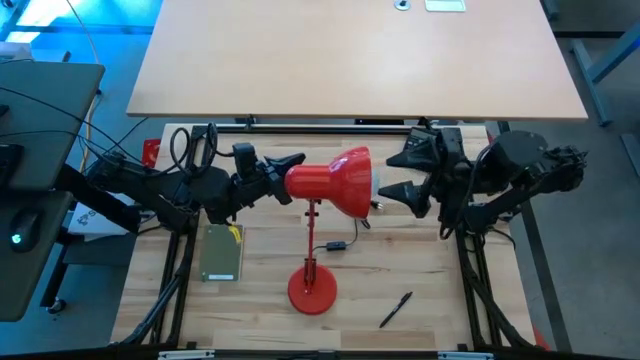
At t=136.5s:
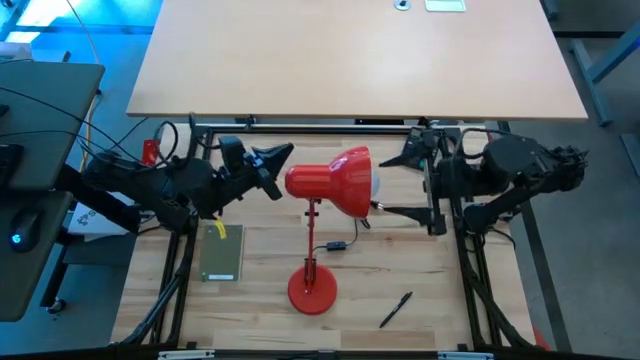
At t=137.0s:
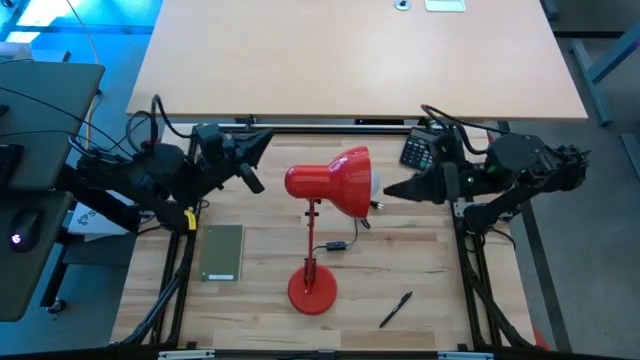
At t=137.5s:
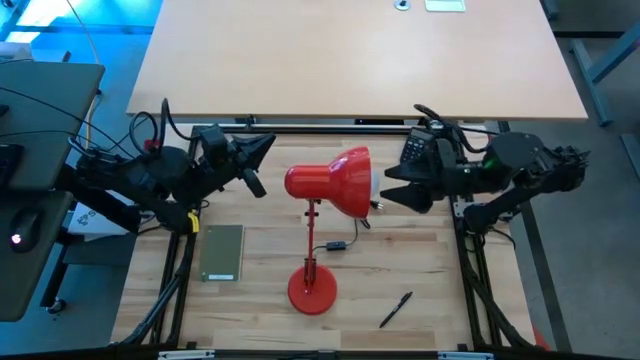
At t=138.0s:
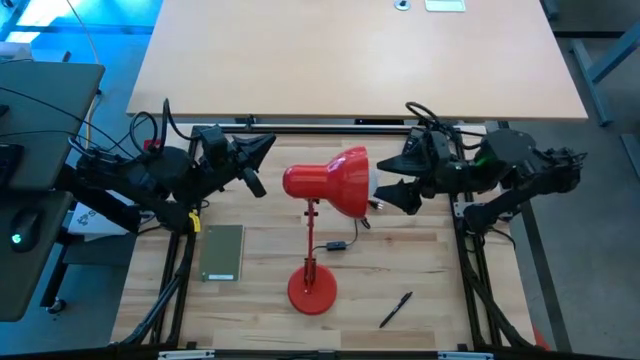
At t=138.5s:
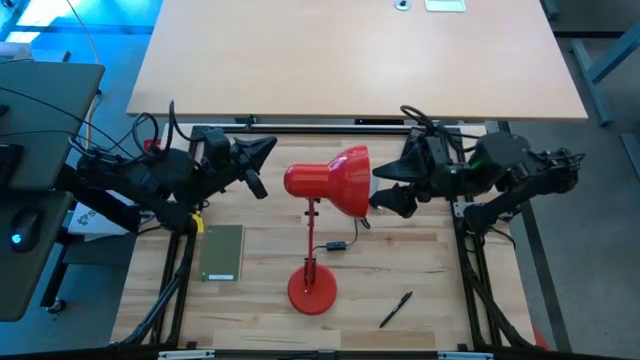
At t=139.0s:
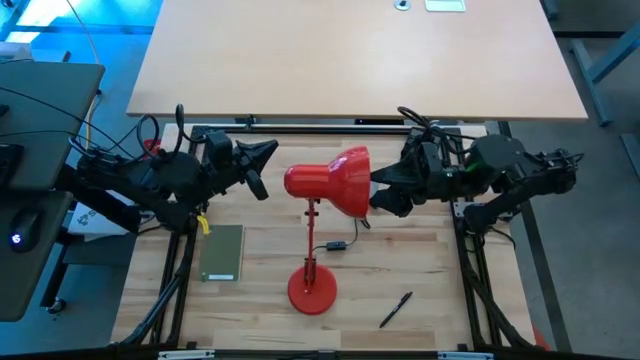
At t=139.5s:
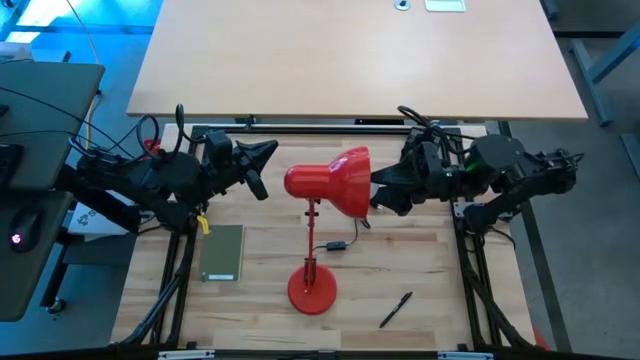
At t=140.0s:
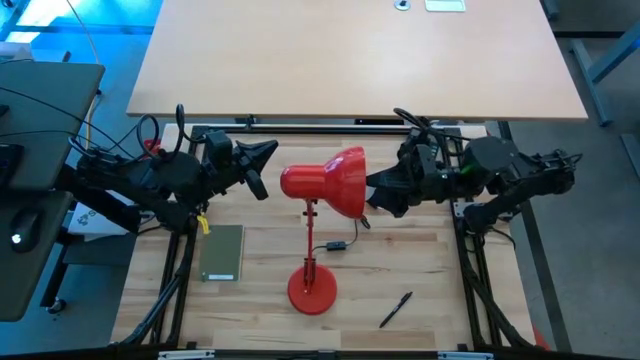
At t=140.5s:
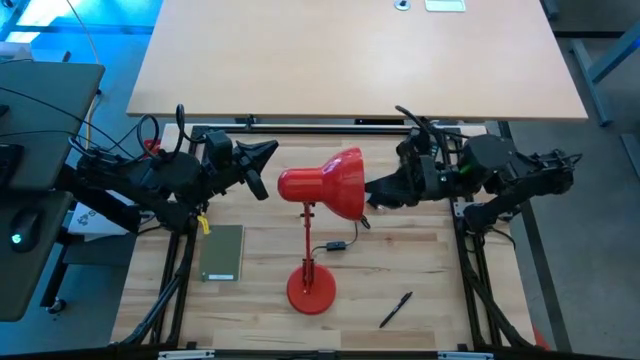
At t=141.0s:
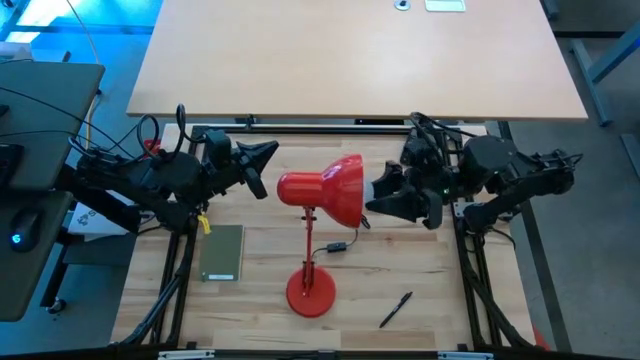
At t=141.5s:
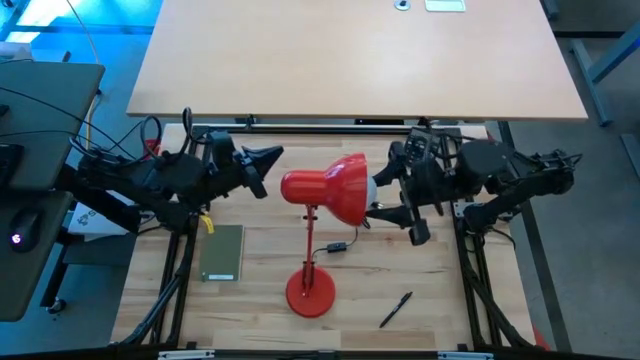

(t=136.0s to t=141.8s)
Task: Screw lightbulb
Insert the white lightbulb into the red lamp

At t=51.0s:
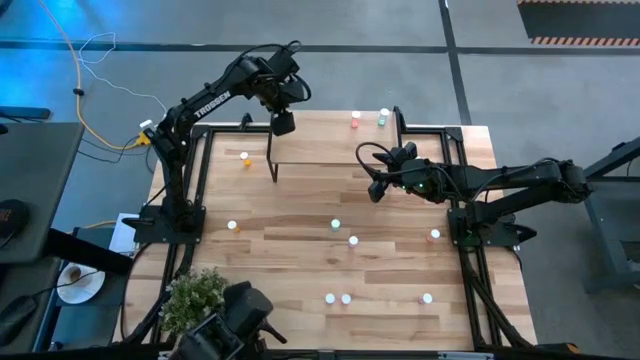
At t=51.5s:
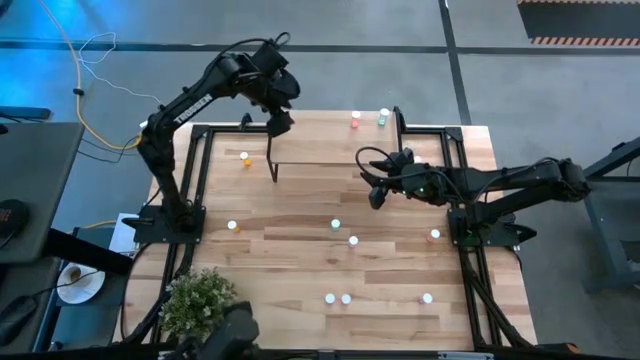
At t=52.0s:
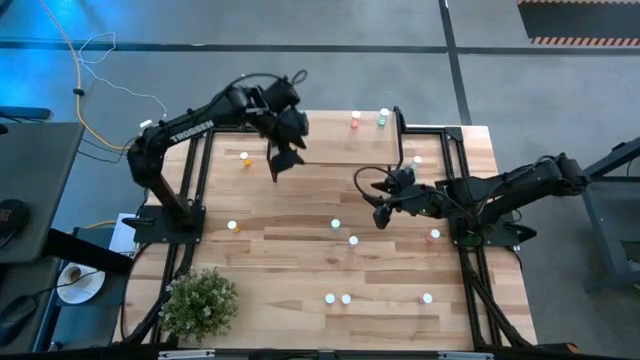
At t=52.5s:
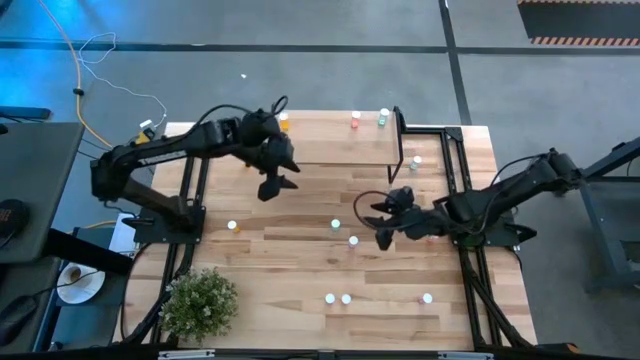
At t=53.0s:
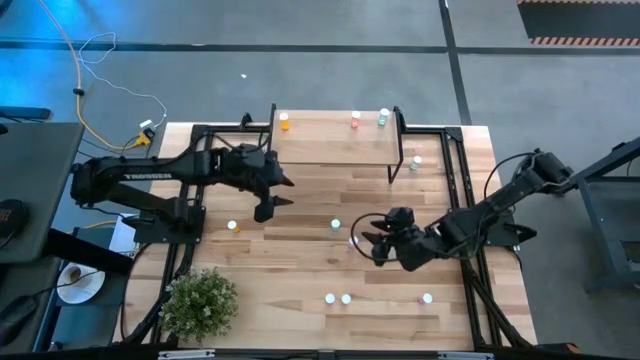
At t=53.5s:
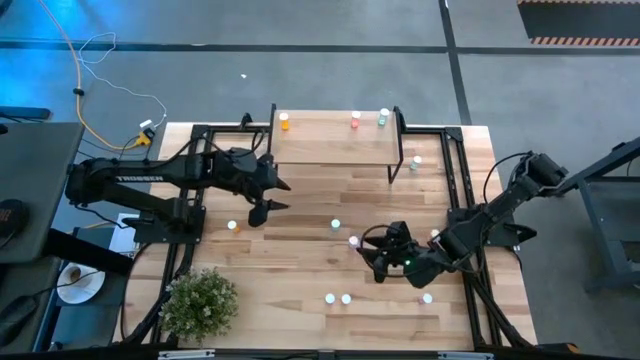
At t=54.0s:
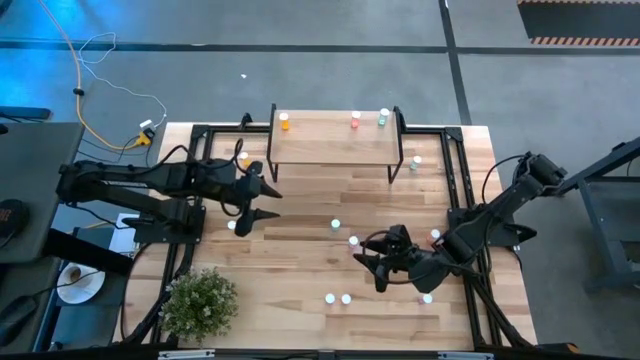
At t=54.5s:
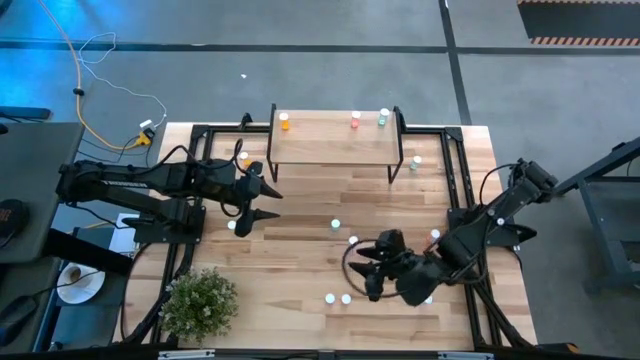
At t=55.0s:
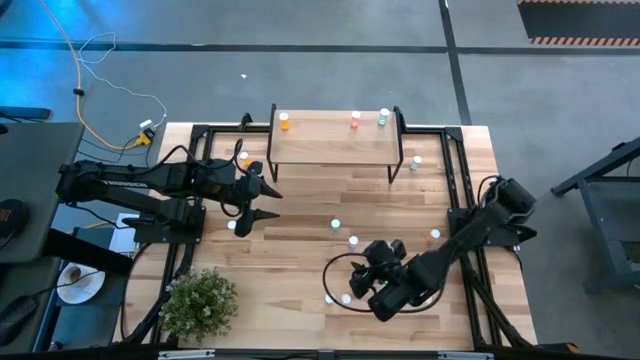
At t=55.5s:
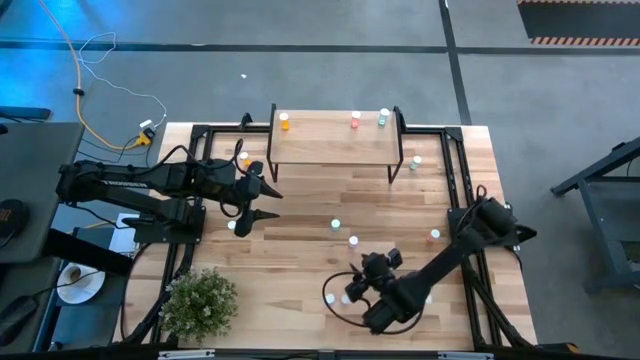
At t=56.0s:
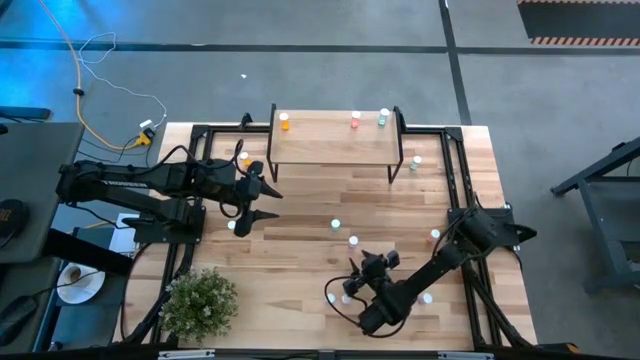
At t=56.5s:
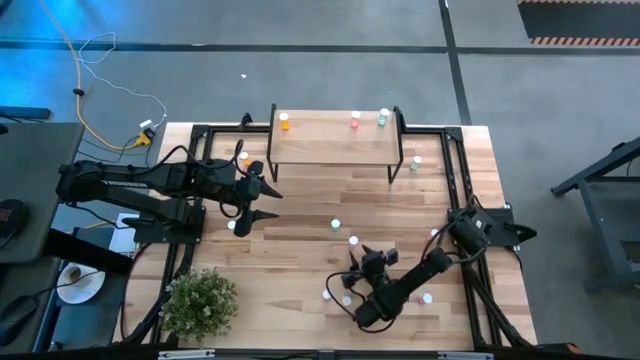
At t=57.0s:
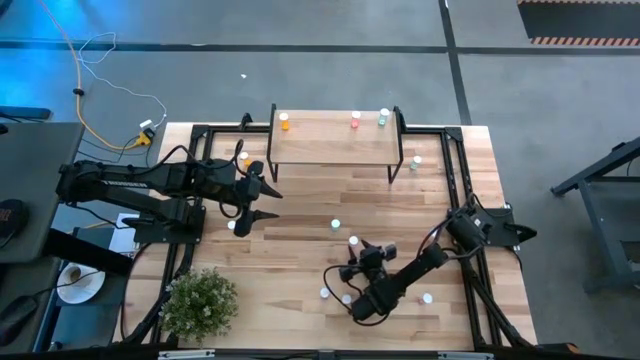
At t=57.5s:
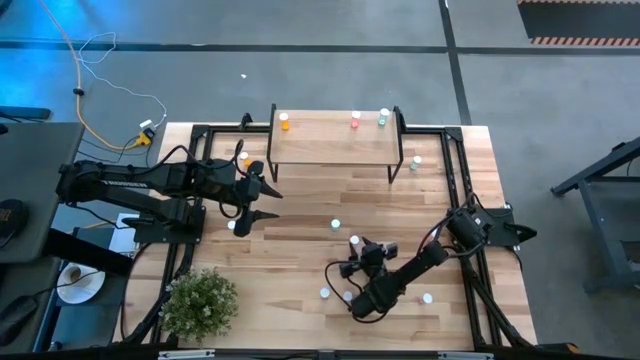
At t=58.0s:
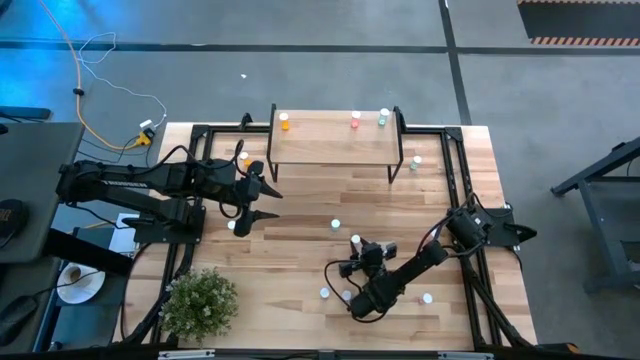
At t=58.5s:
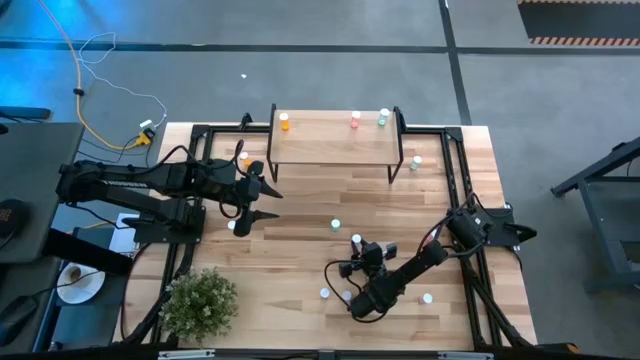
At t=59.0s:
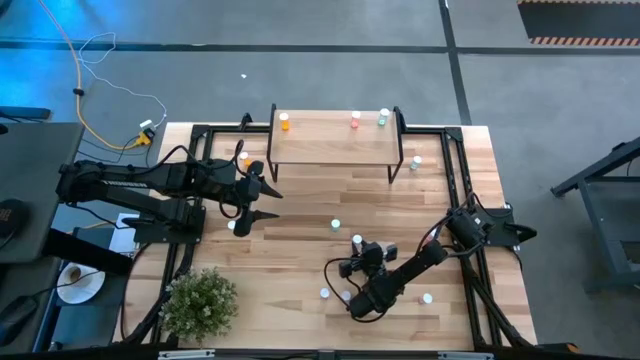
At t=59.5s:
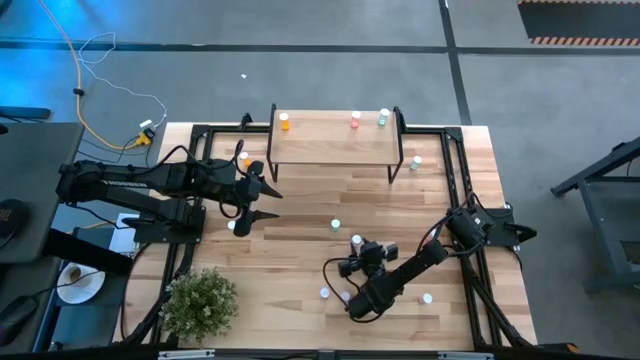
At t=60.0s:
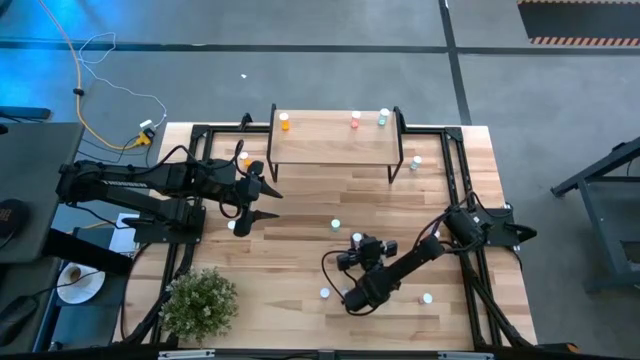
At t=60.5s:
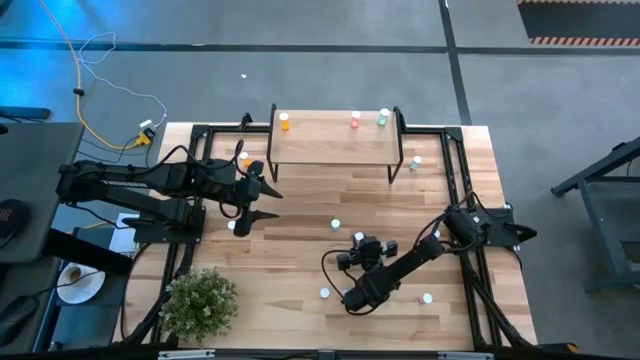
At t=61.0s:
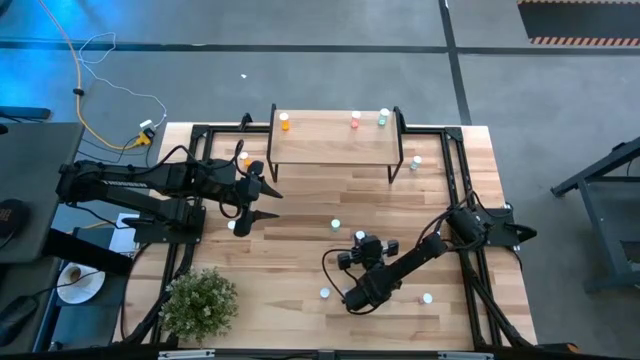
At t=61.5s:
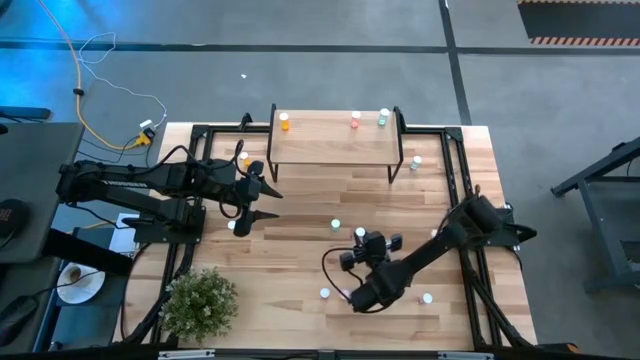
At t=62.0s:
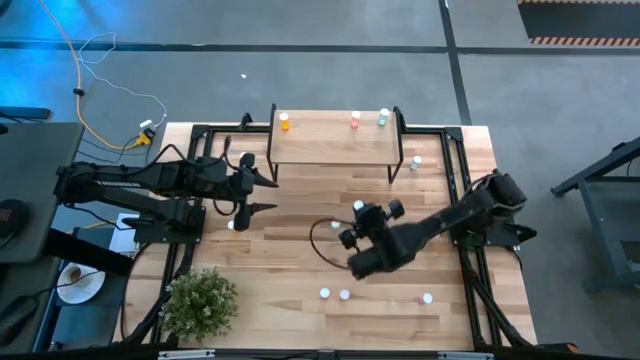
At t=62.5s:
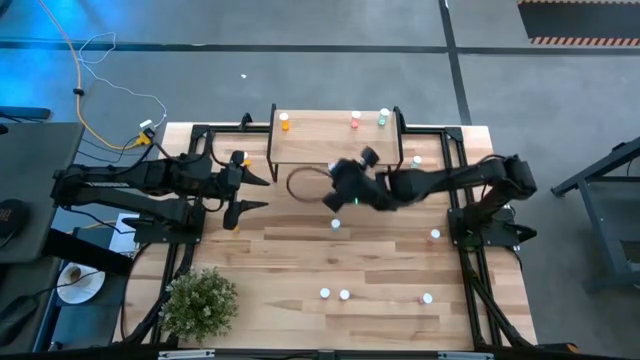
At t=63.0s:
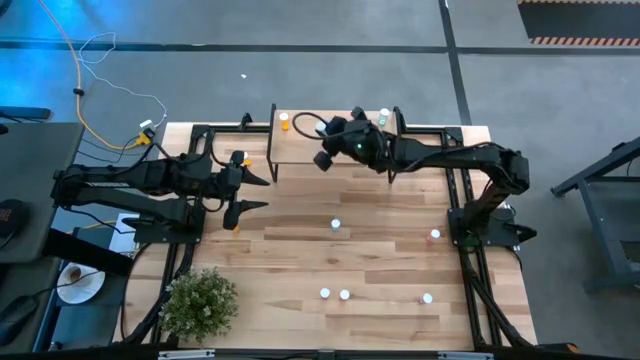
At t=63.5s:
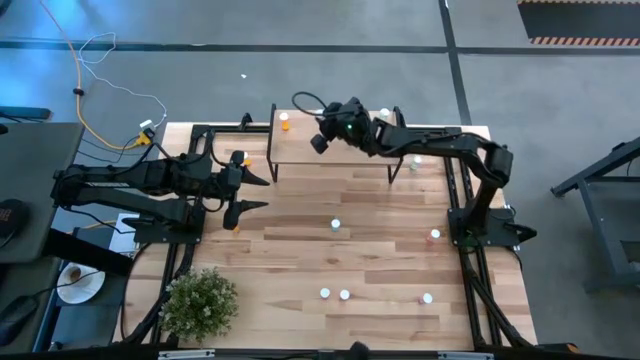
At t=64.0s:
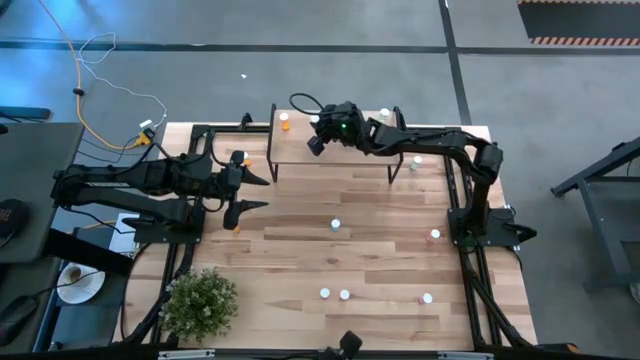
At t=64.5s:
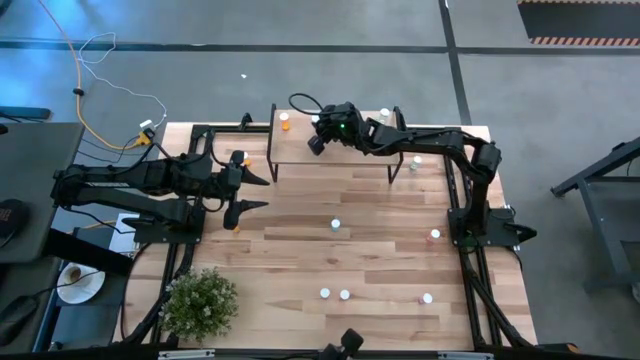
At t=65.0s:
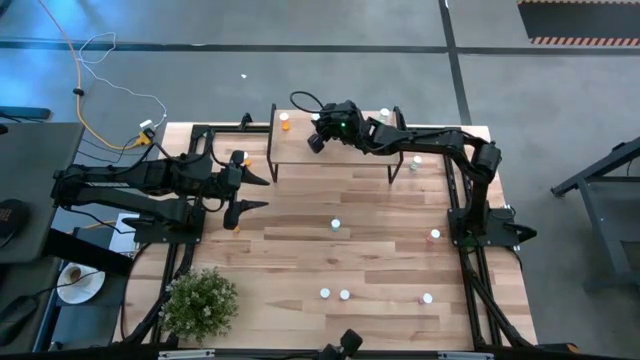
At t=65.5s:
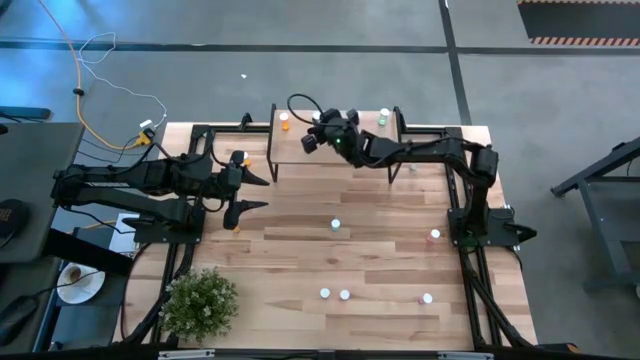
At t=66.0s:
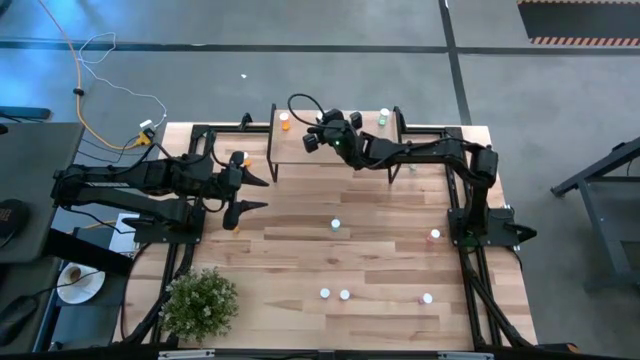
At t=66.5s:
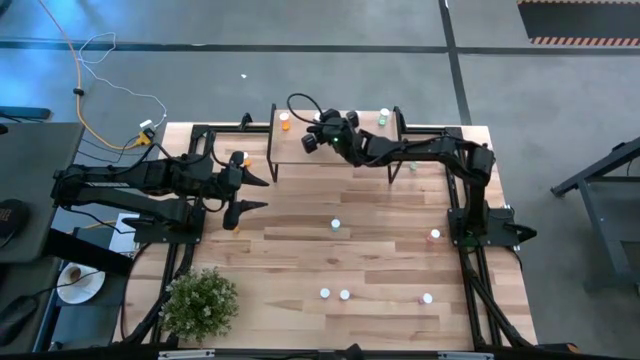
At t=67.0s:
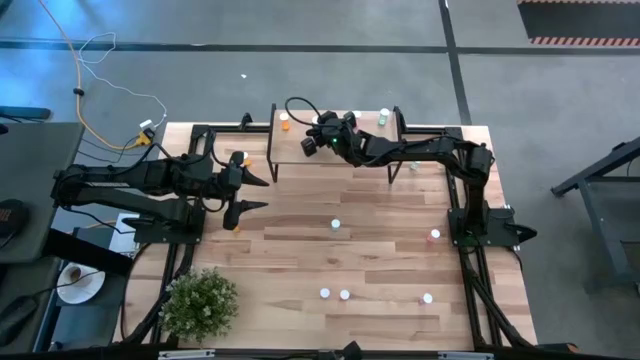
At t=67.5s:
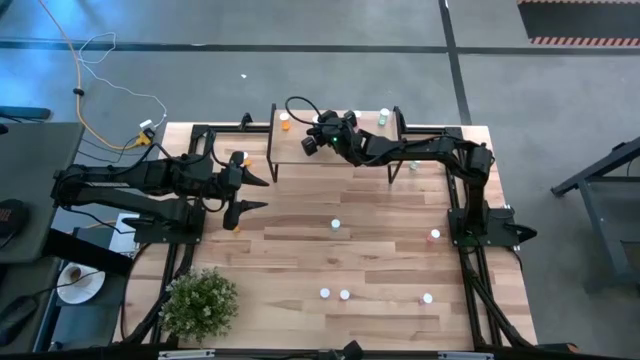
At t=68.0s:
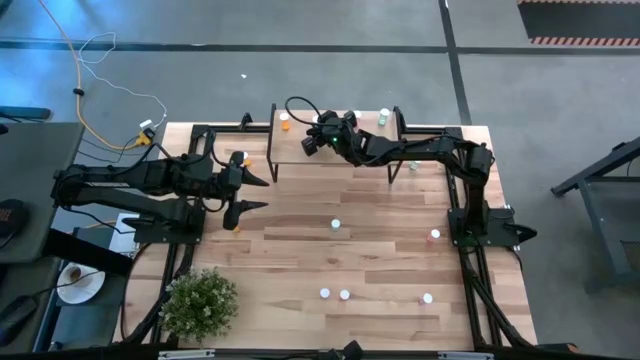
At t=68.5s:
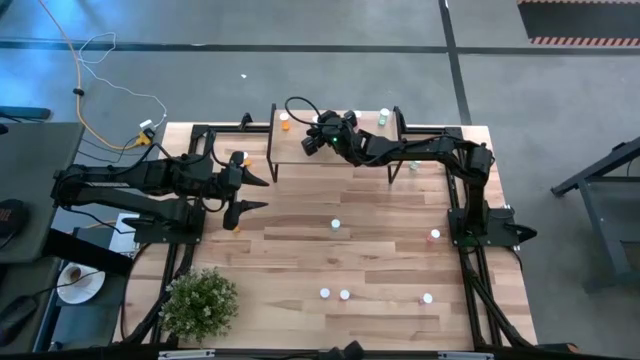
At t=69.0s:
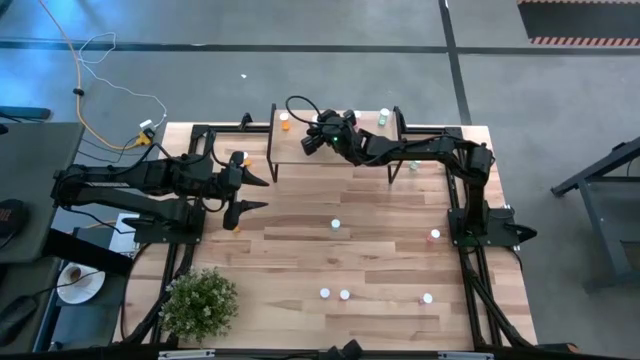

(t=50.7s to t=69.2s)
Task: Pick and place medicine bottles onto shelf by color
Put the top purple pill bottle on the shelf
